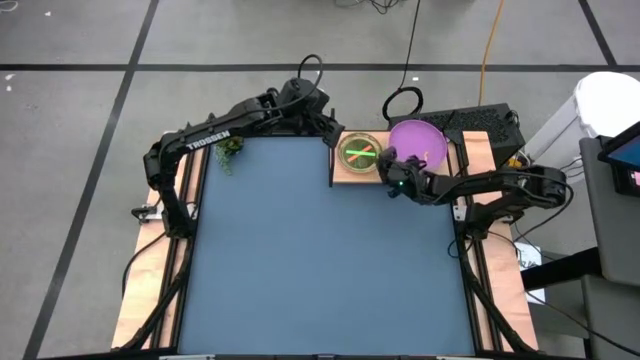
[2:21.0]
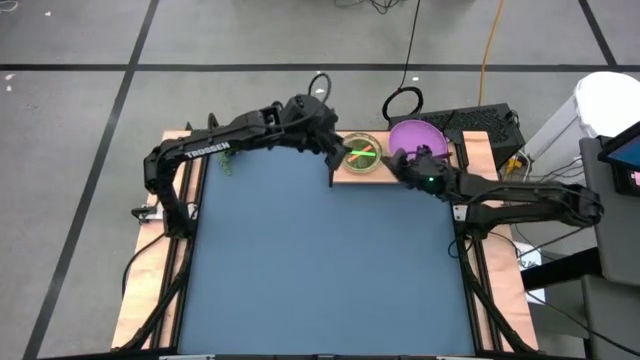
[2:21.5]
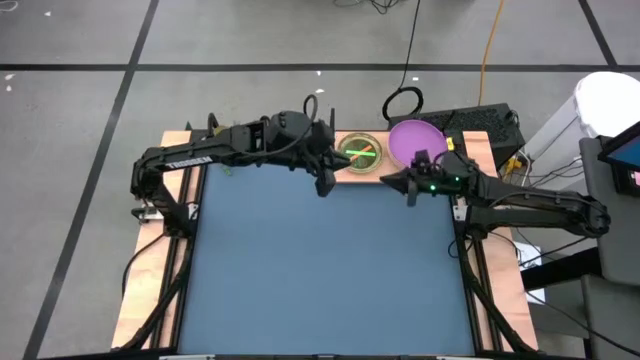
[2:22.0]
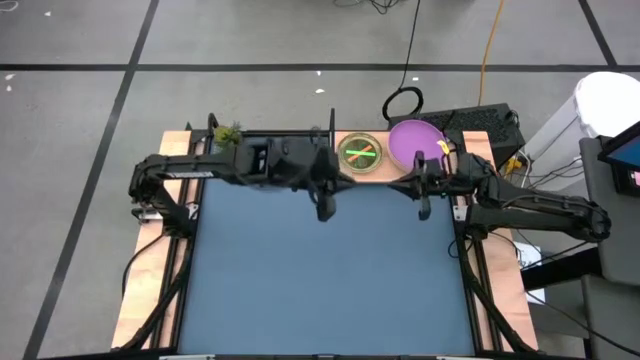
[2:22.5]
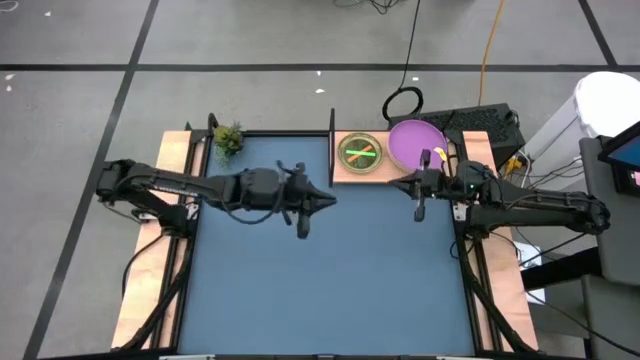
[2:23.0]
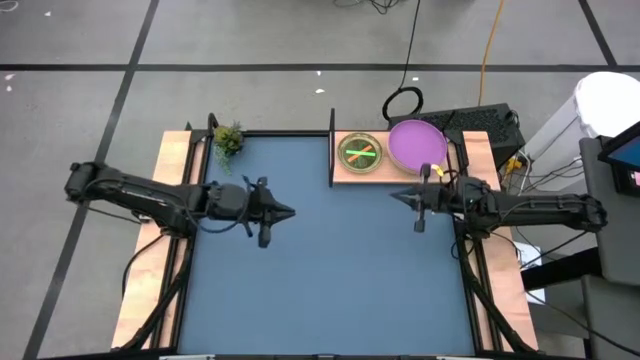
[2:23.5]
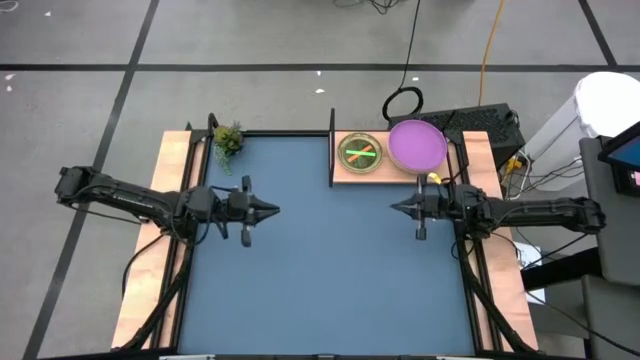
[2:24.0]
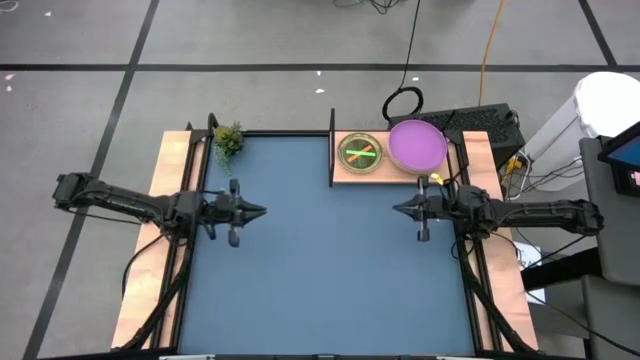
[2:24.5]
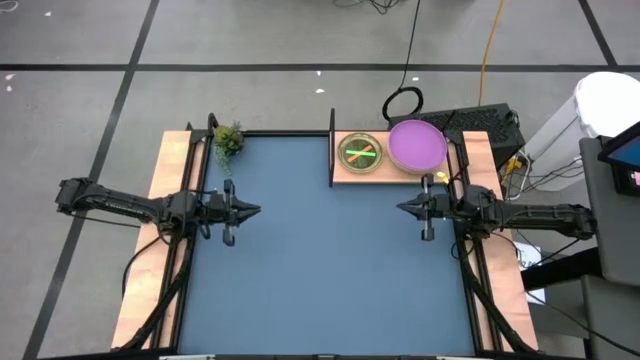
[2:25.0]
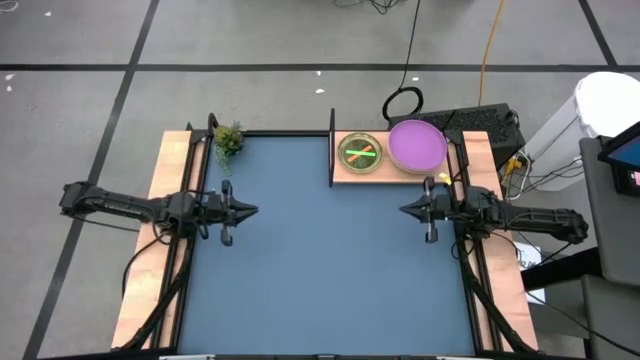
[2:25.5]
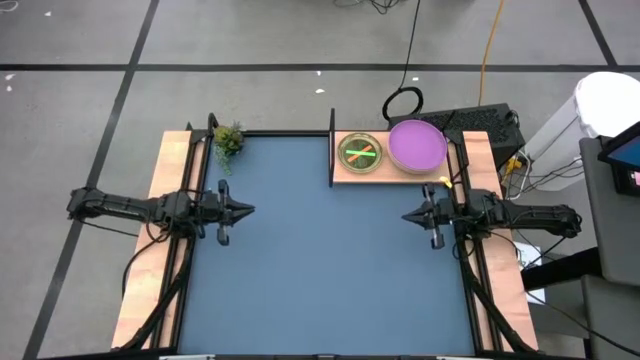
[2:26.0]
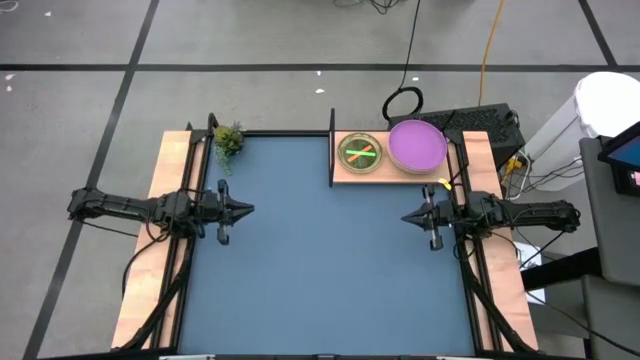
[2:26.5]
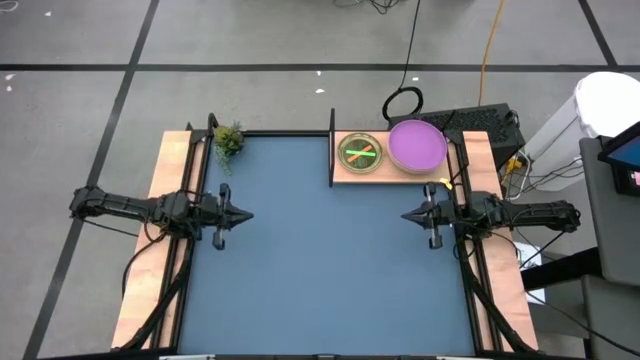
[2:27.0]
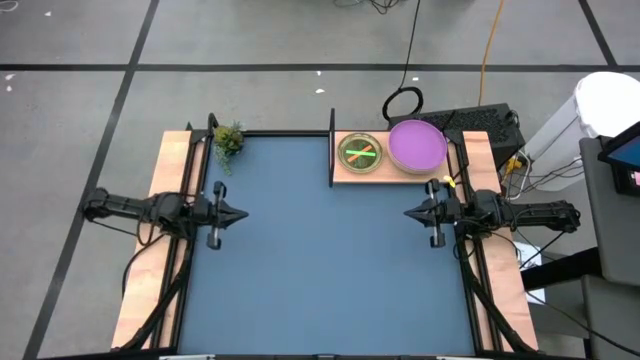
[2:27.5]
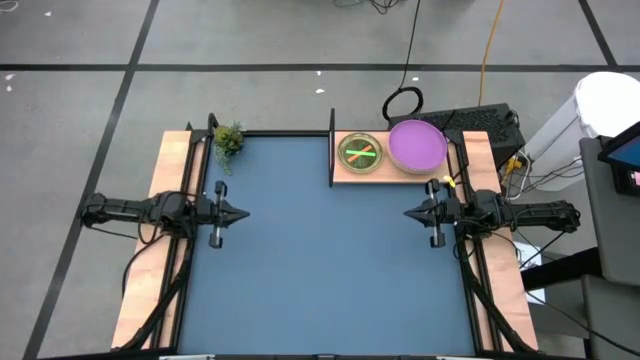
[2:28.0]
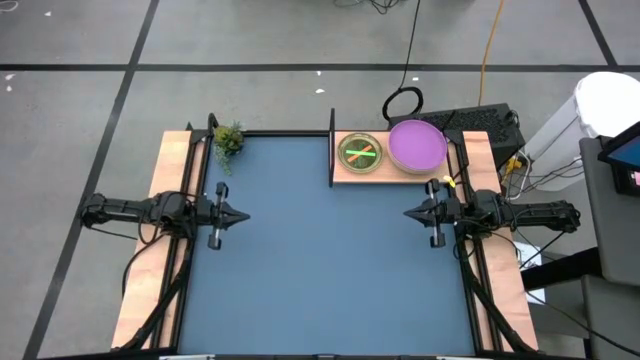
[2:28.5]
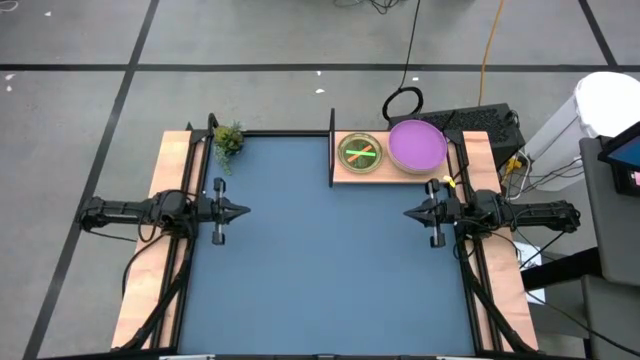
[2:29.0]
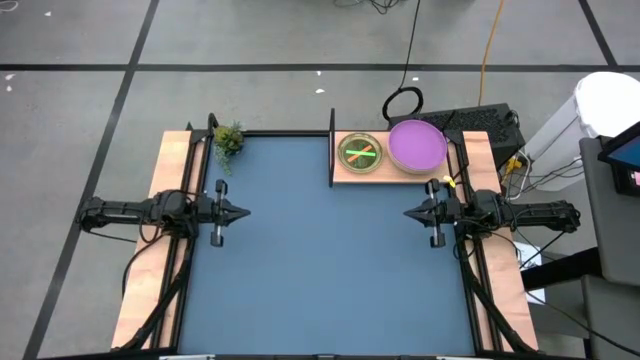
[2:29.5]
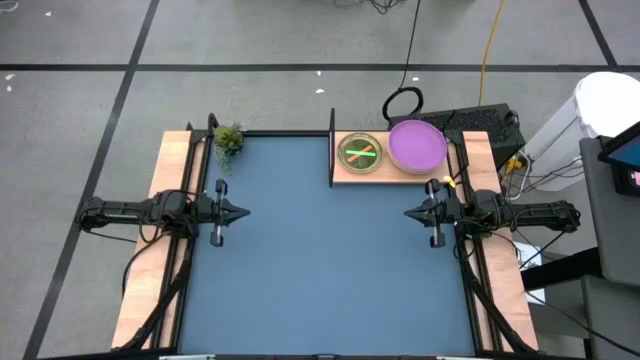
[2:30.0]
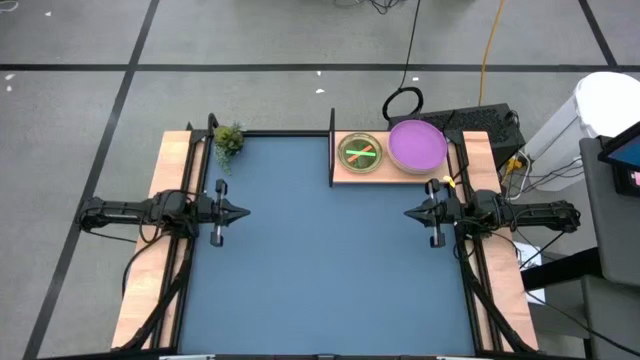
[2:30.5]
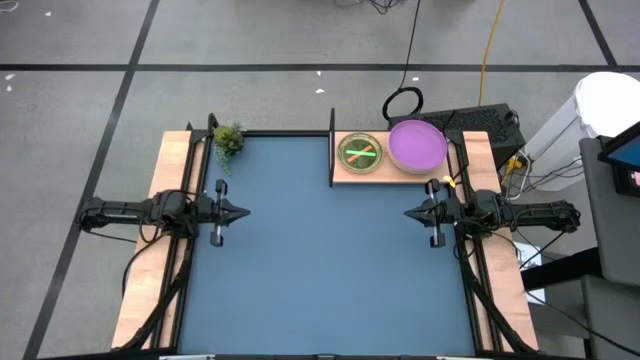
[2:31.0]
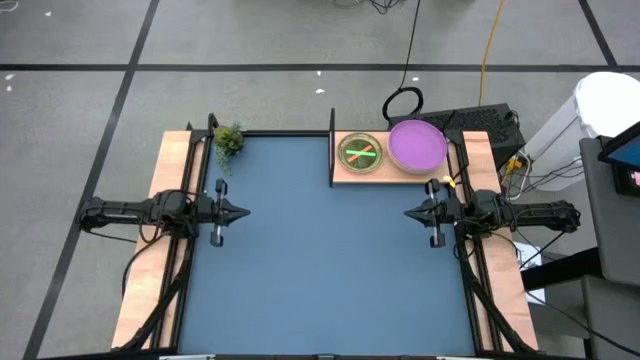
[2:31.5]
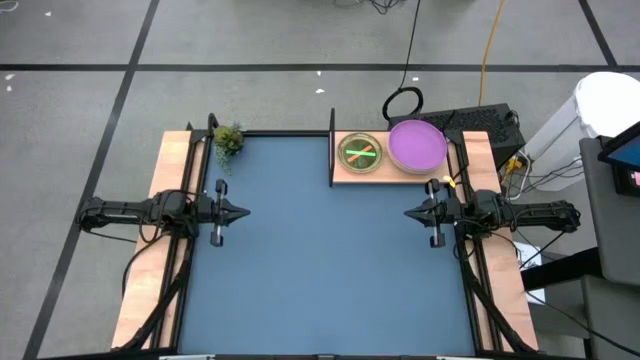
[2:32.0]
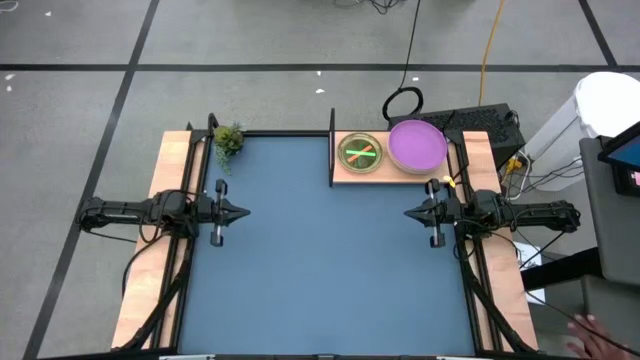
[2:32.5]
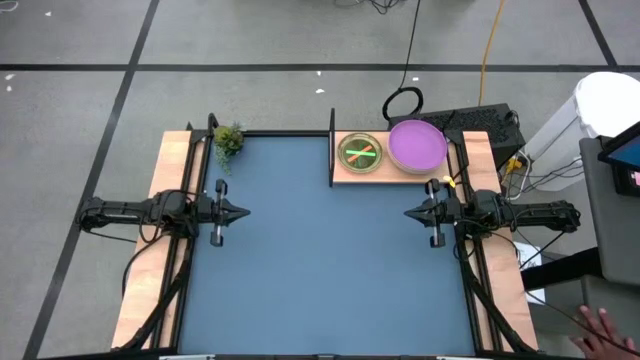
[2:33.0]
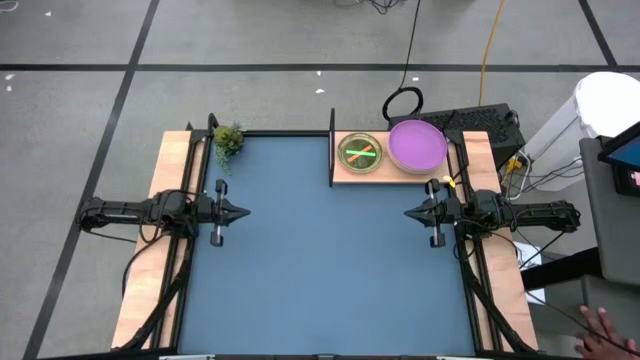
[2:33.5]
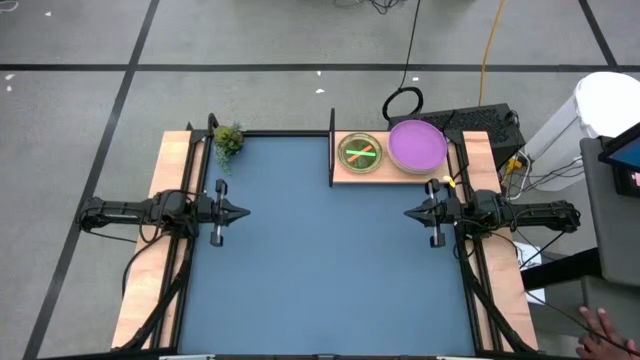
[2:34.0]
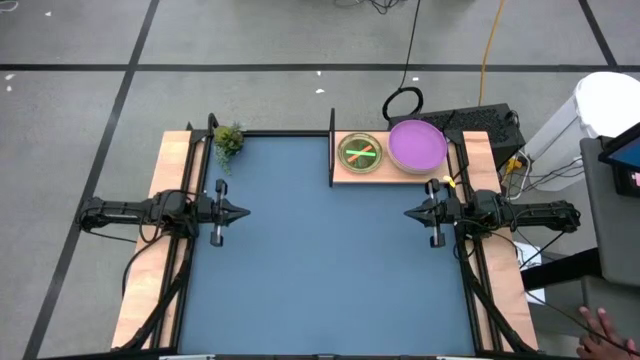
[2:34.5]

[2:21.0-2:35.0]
Task: Place and stack plates onto a shelf
Return to Home Position

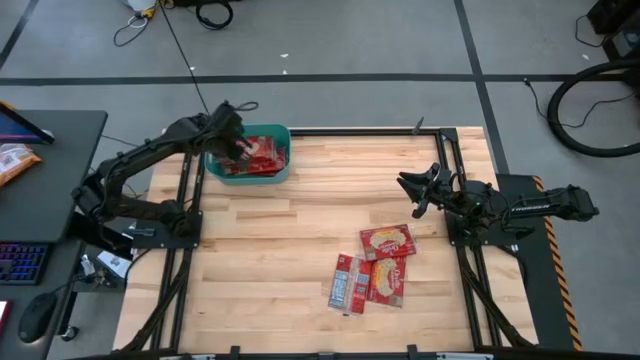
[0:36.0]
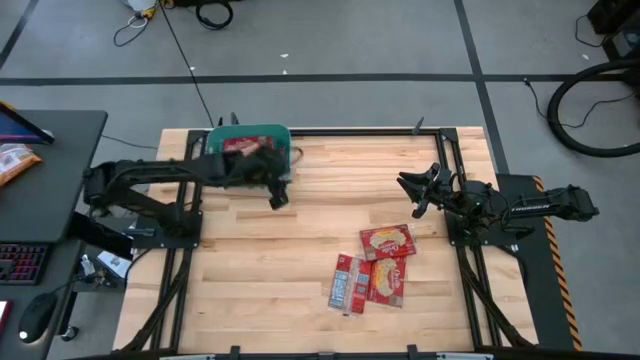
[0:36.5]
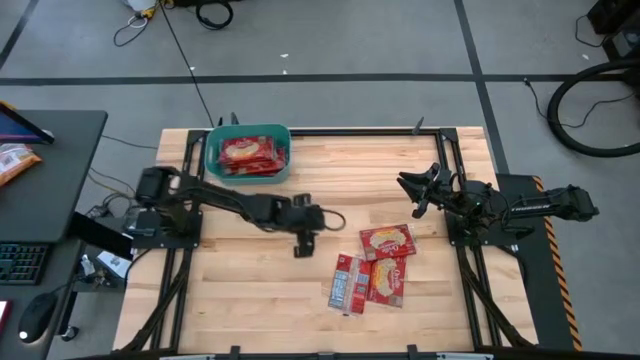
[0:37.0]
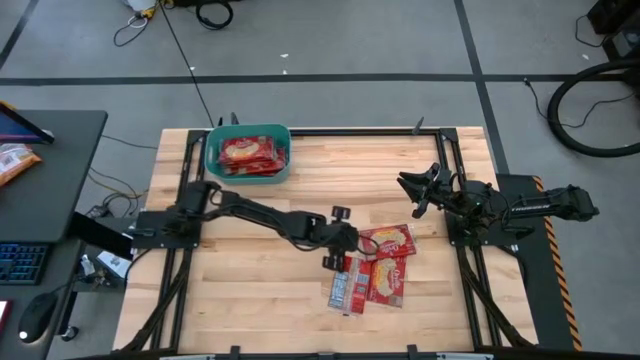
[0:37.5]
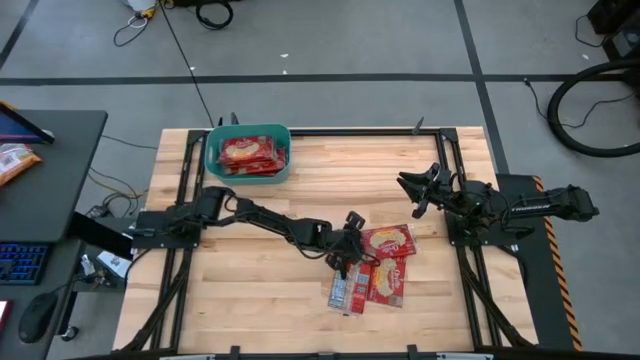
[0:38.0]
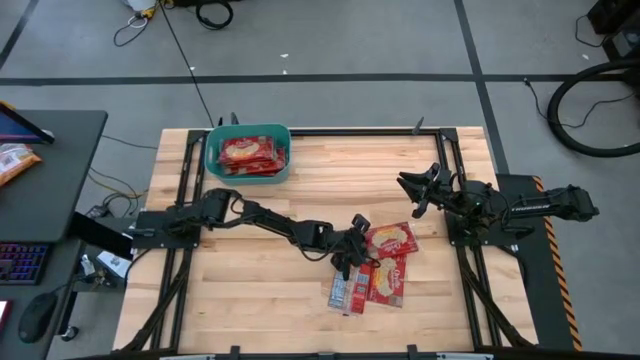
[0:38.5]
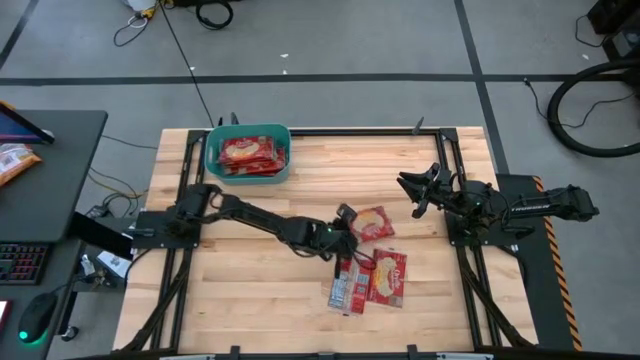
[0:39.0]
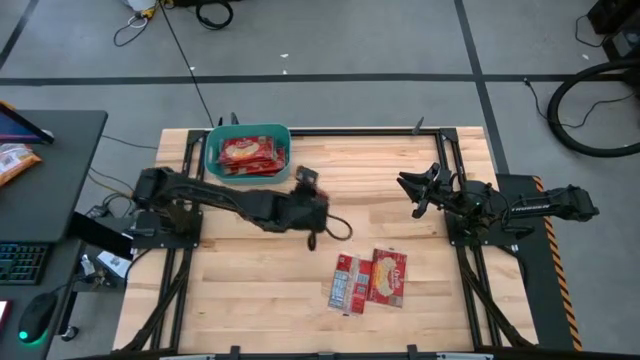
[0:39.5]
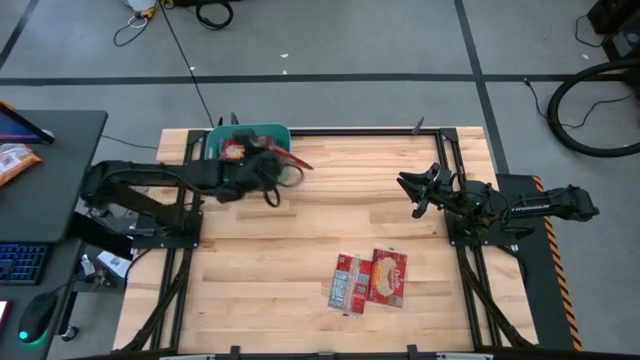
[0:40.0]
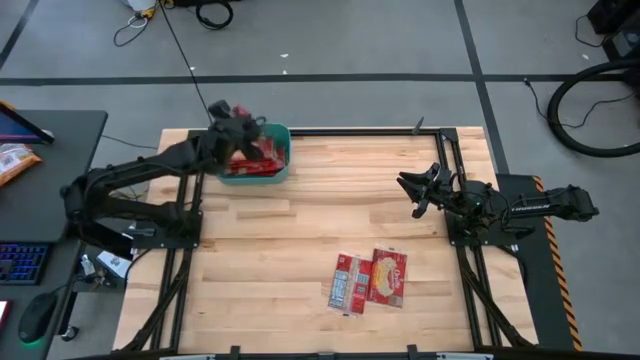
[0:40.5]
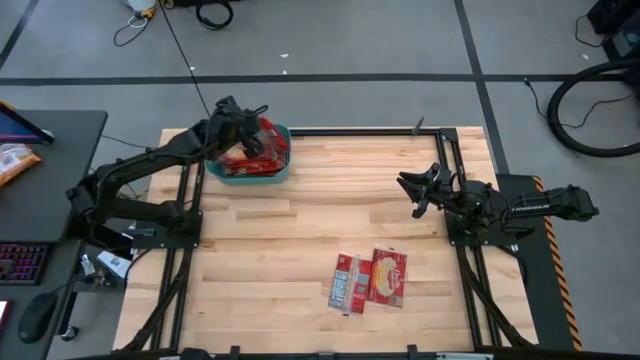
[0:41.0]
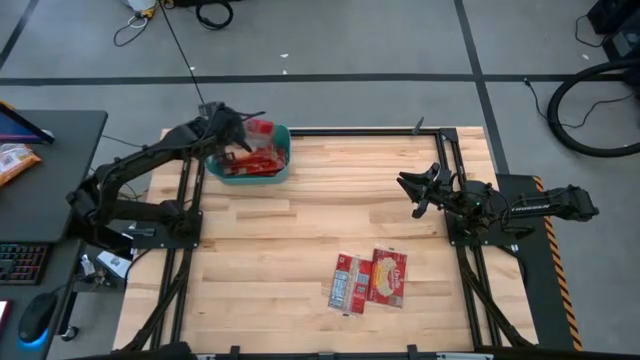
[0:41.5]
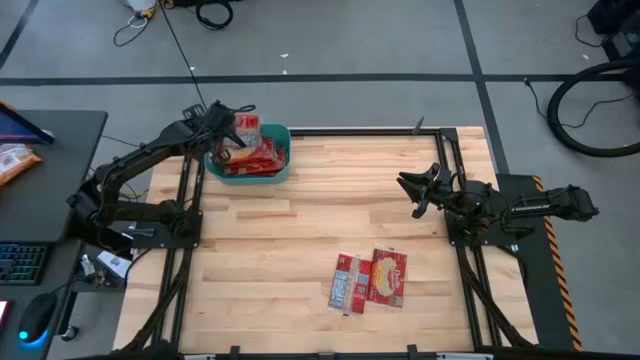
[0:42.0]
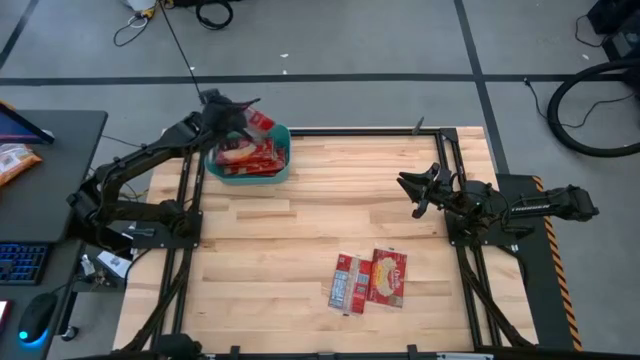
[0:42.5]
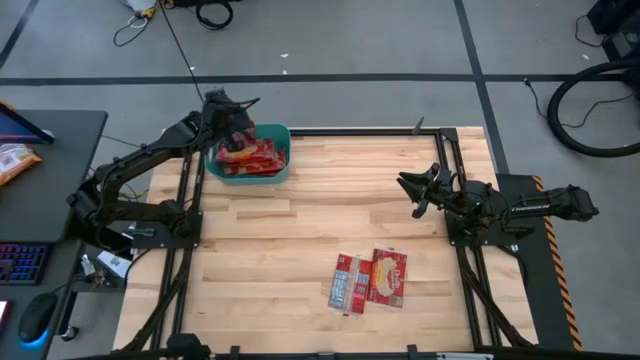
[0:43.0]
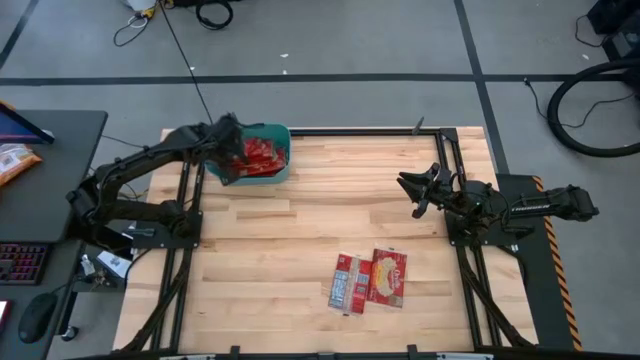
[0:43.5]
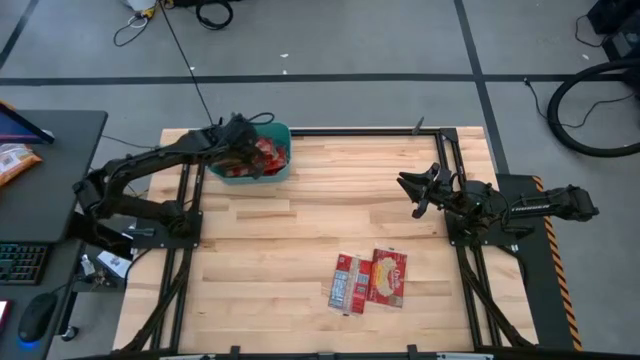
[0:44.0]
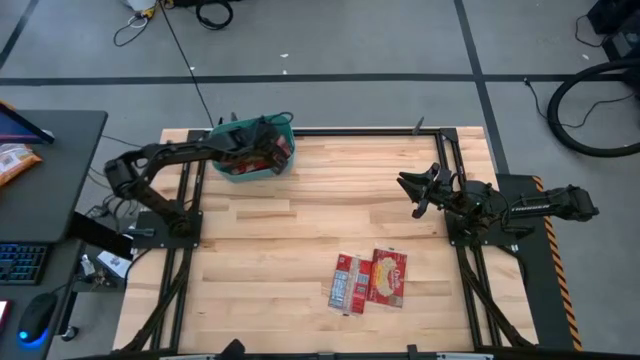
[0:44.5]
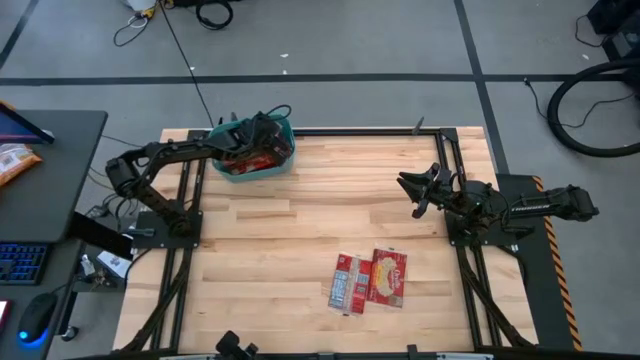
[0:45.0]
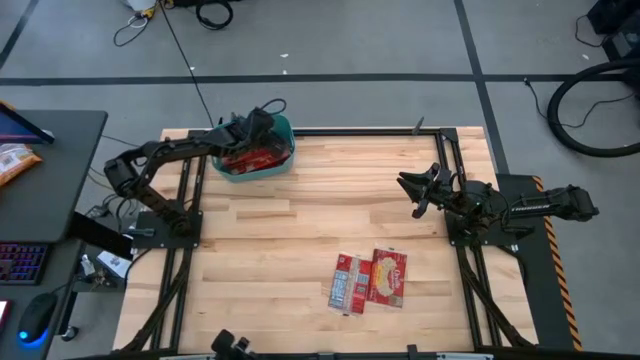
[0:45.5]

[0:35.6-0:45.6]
Task: Sort popcorn bags into baskets
Put the red popcorn bag into the blue bin
